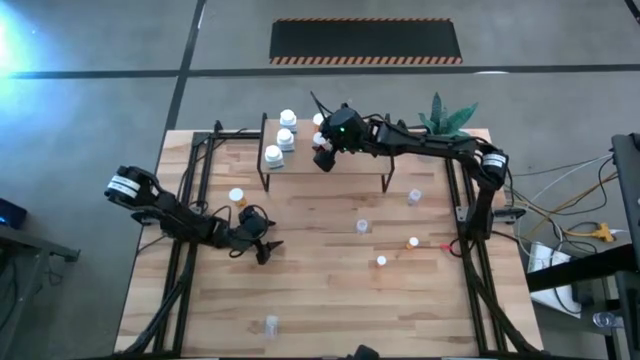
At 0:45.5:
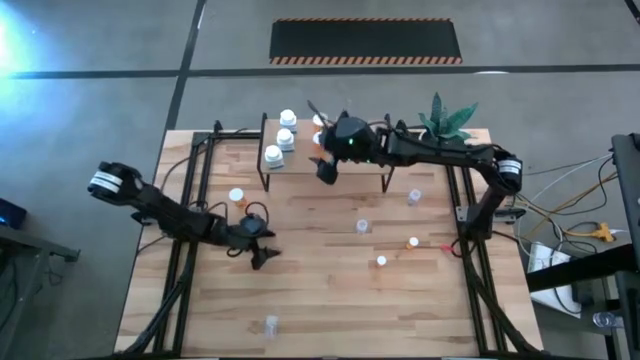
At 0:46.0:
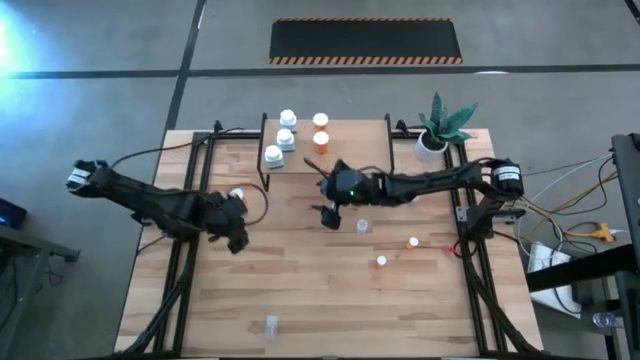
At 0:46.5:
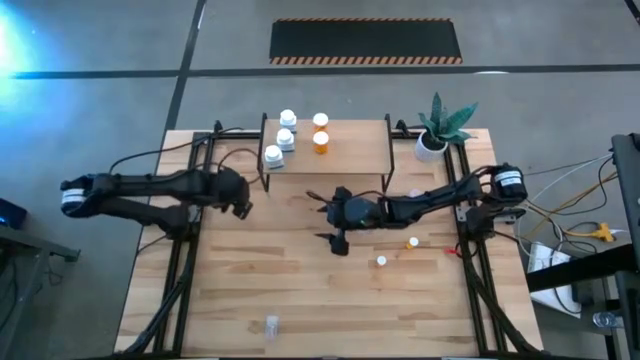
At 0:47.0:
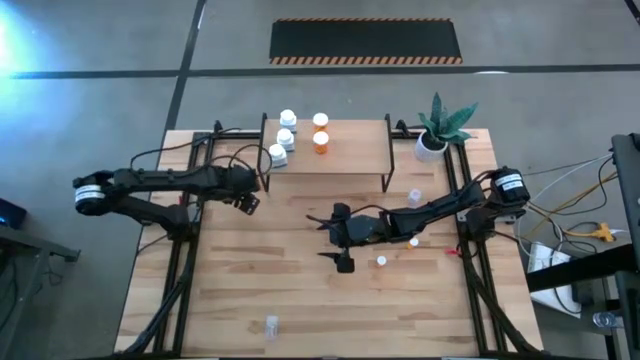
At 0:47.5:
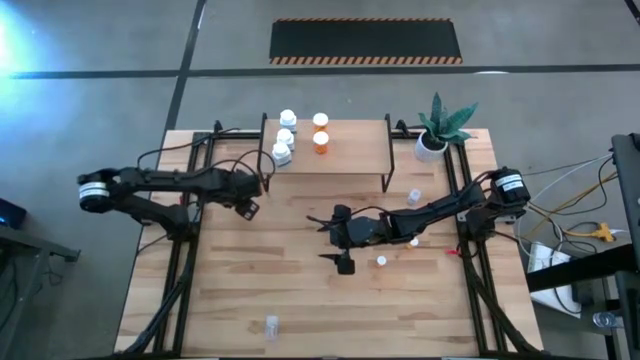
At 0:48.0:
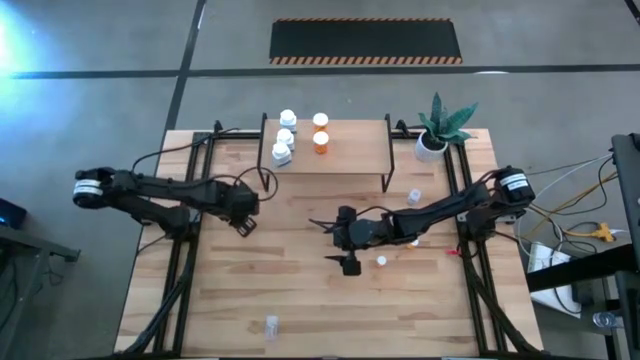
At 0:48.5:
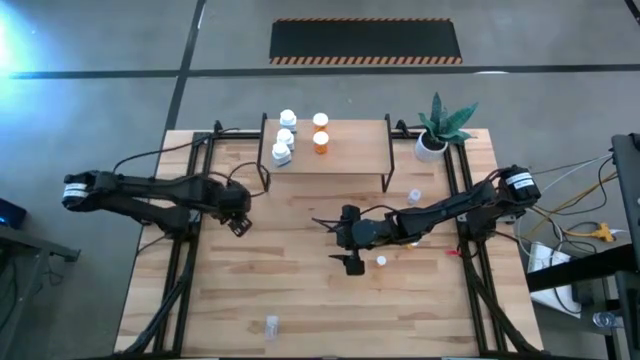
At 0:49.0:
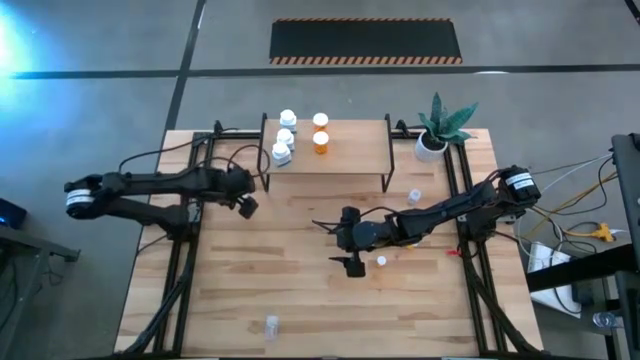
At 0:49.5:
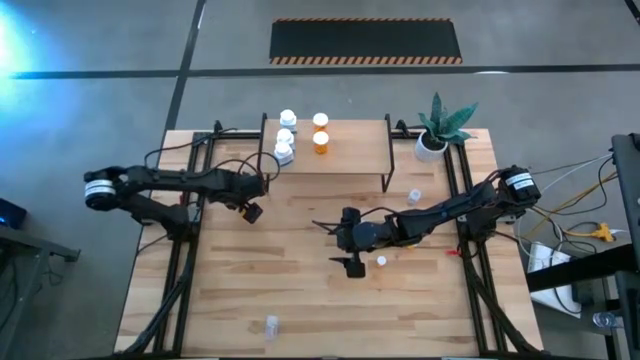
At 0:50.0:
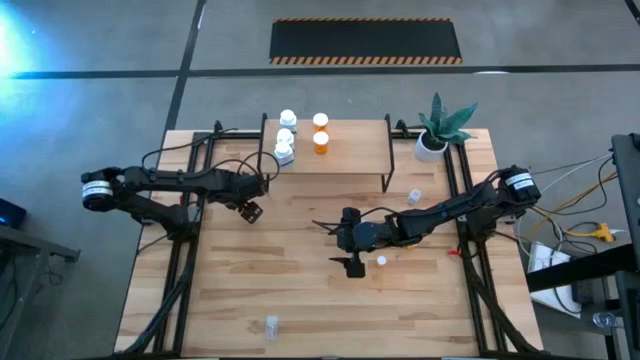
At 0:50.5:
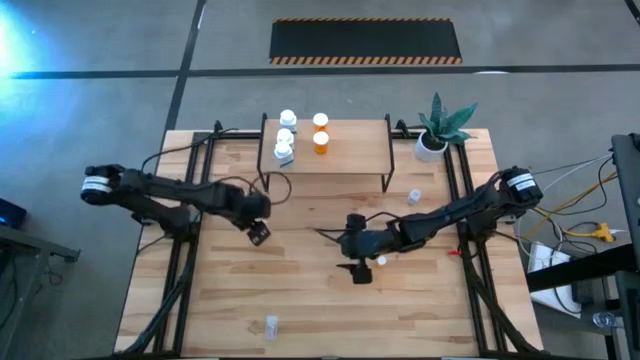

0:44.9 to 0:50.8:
Task: Pick and place medicine bottles onto shelf by color
Put the big orange pill bottle on the shelf aligned with the other big orange pill bottles

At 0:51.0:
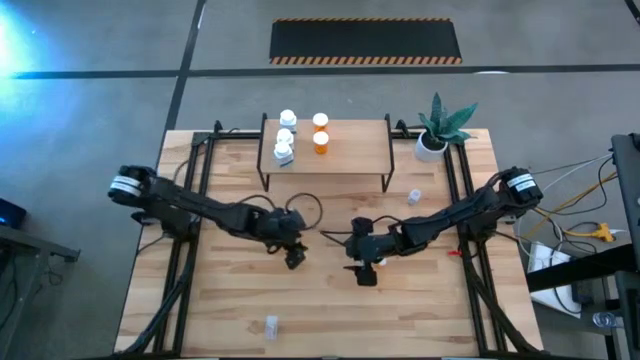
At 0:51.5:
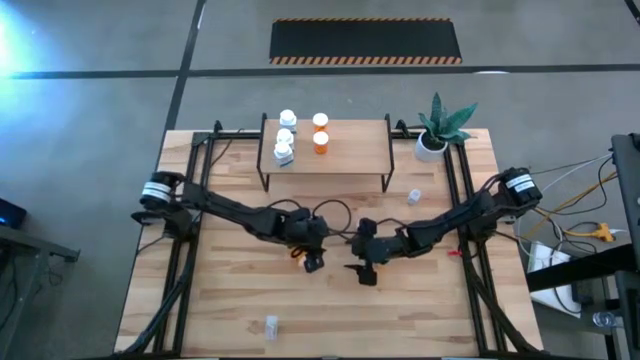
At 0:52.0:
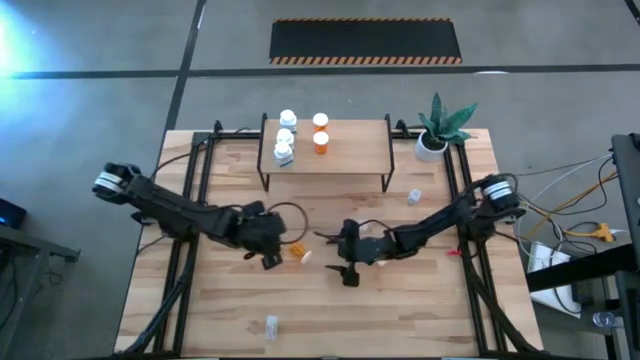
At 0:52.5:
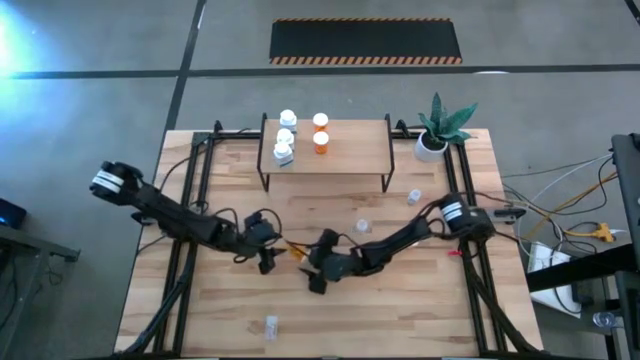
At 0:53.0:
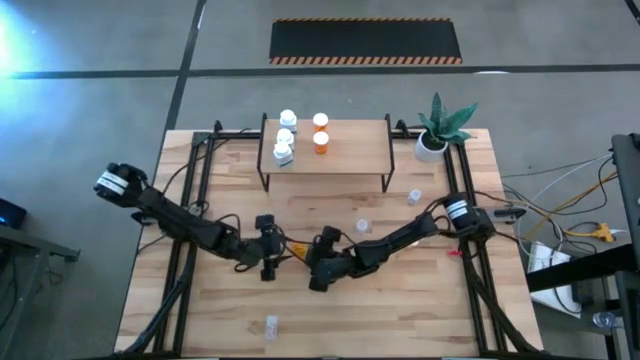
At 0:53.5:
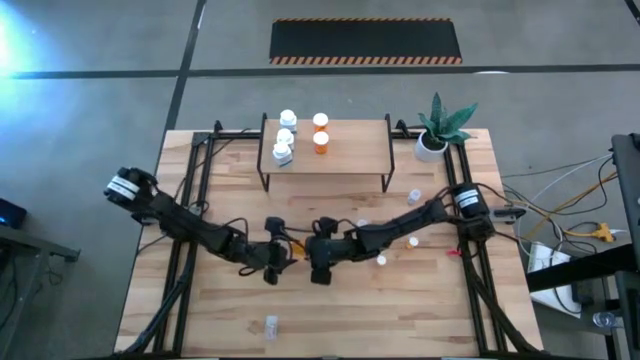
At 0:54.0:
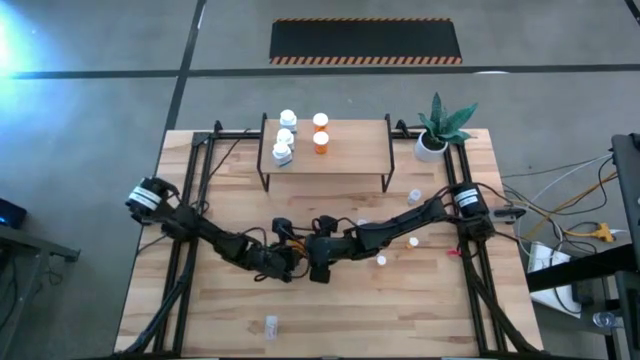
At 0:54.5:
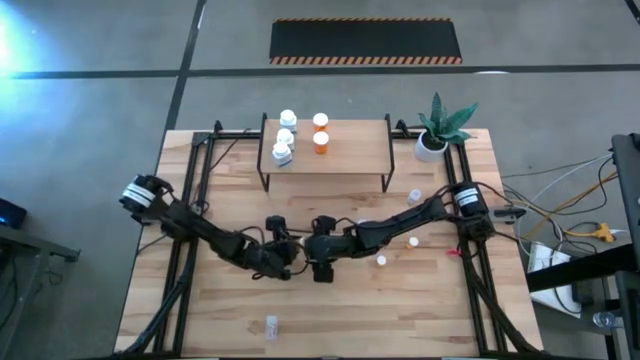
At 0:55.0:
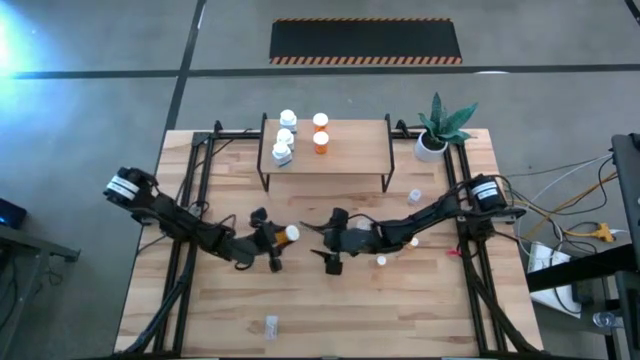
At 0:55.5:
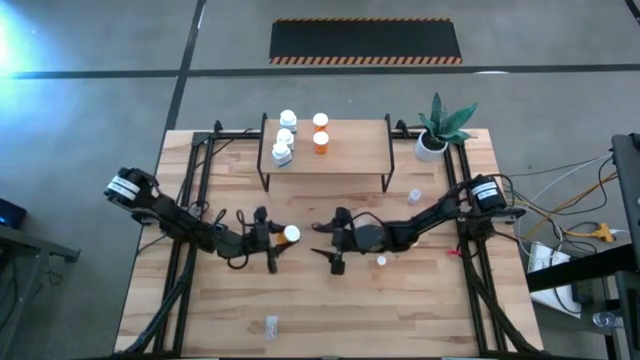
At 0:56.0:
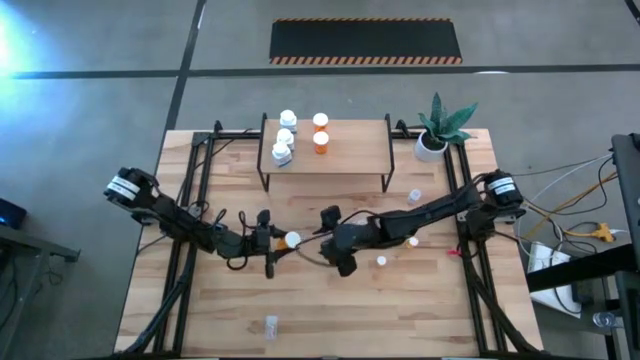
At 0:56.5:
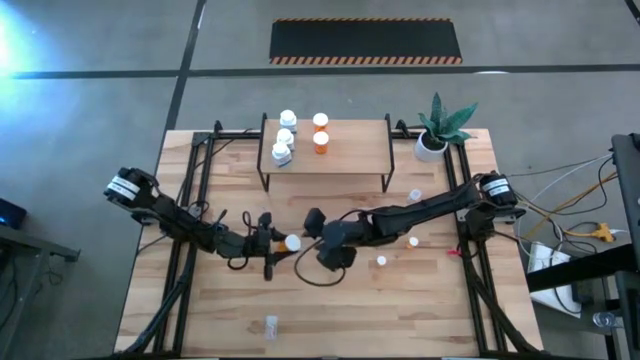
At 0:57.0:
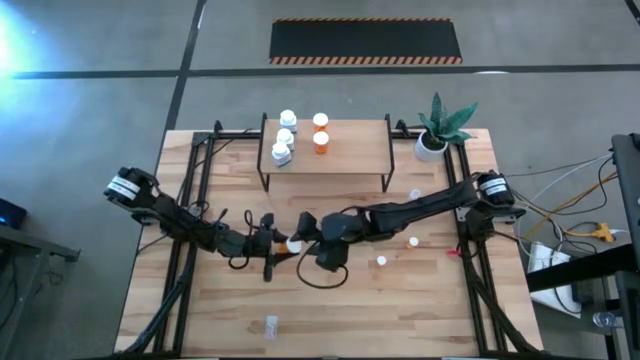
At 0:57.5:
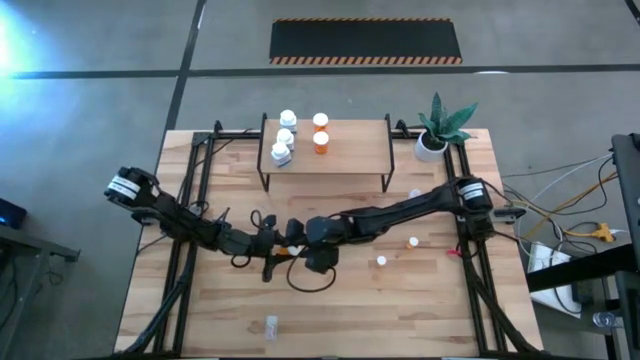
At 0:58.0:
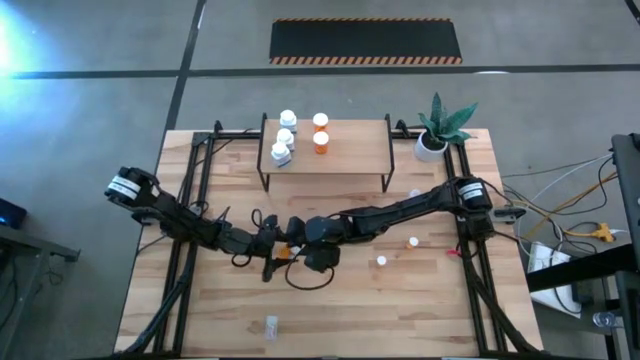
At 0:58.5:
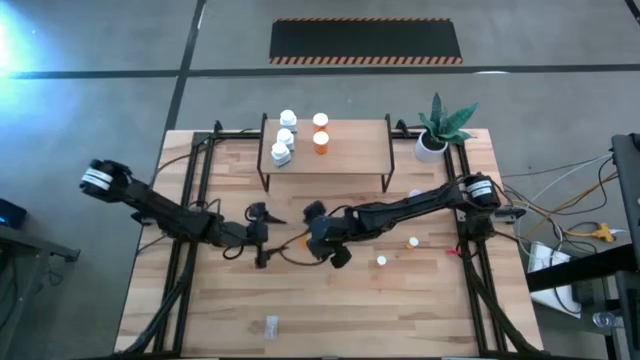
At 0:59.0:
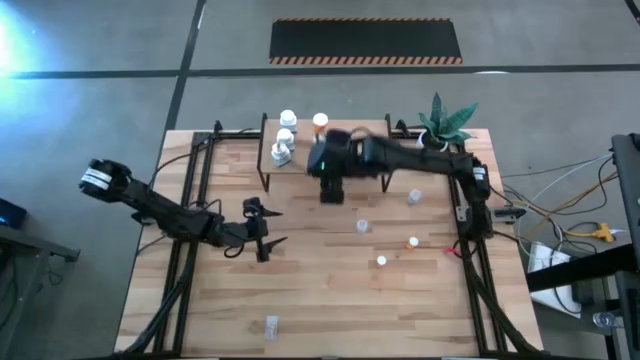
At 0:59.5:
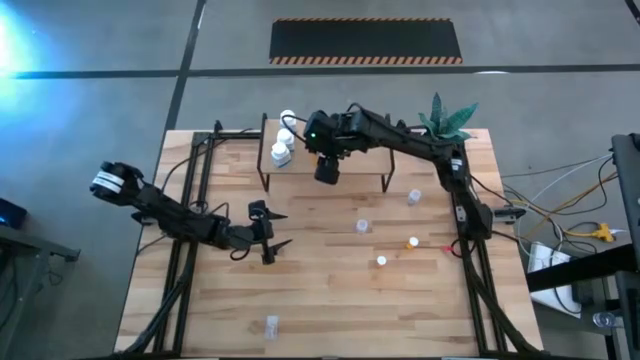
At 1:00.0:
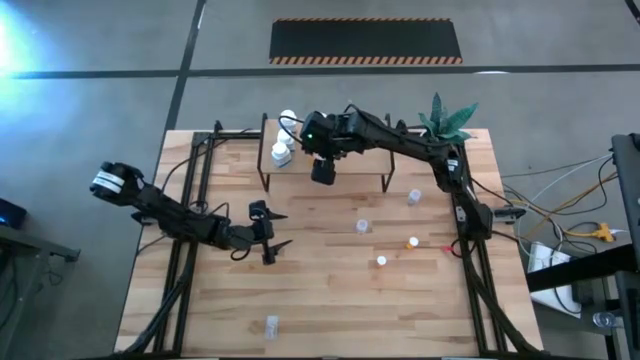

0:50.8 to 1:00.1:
Put the big orange pill bottle on the shelf aligned with the other big orange pill bottles

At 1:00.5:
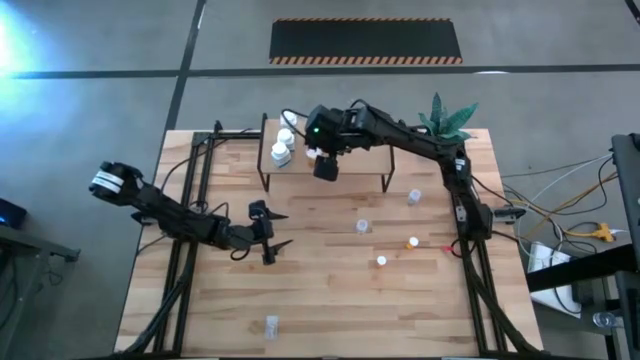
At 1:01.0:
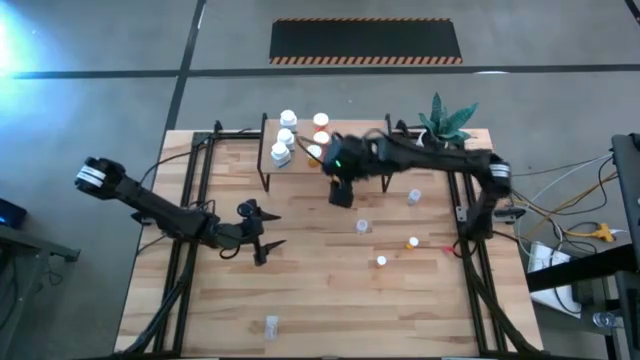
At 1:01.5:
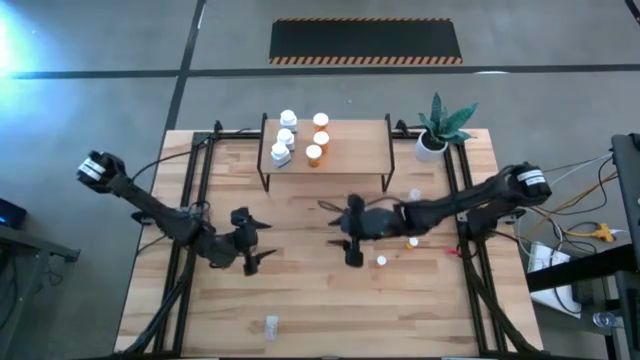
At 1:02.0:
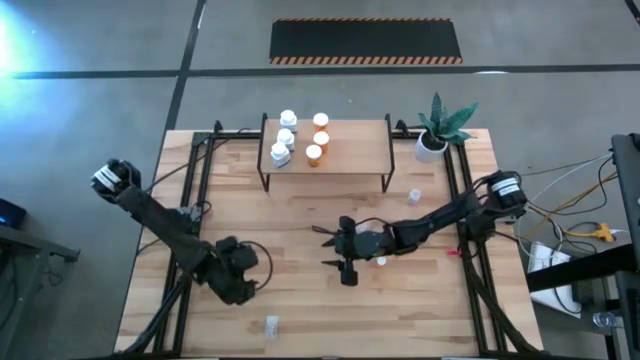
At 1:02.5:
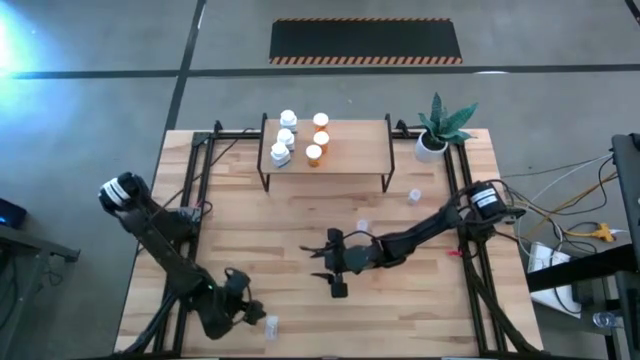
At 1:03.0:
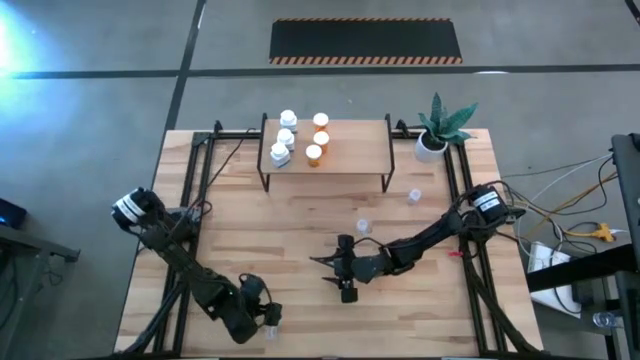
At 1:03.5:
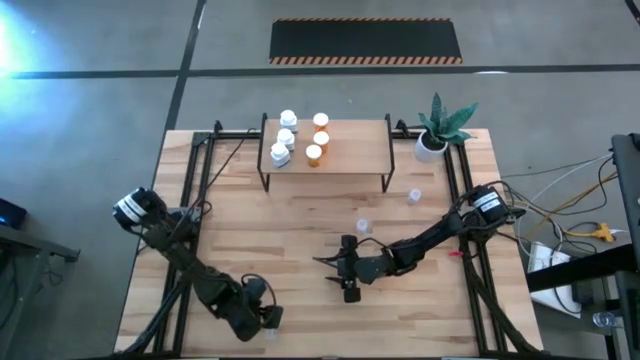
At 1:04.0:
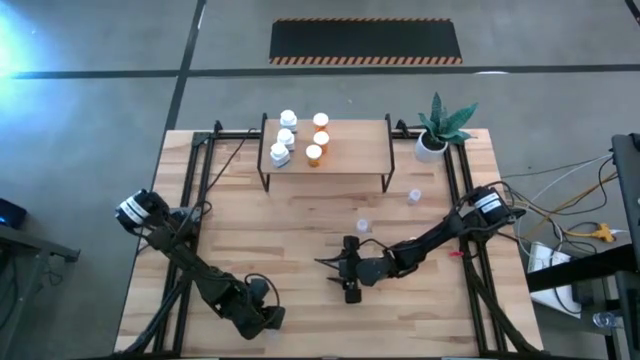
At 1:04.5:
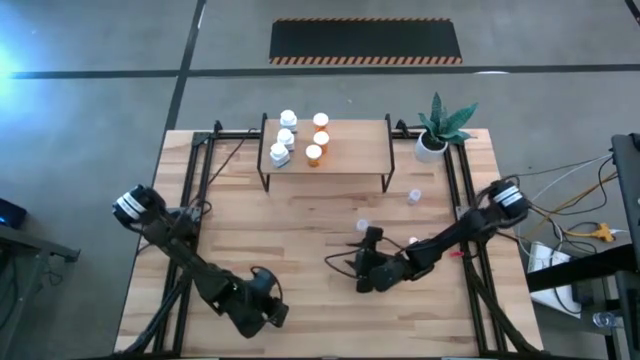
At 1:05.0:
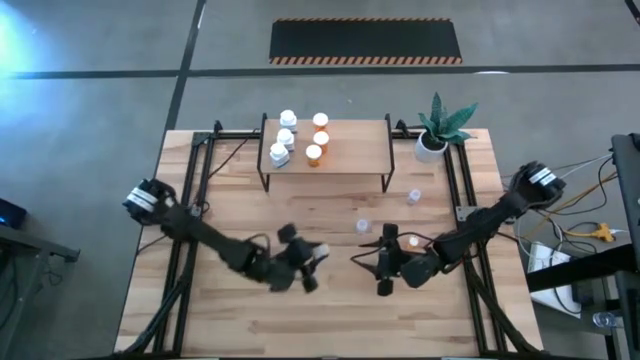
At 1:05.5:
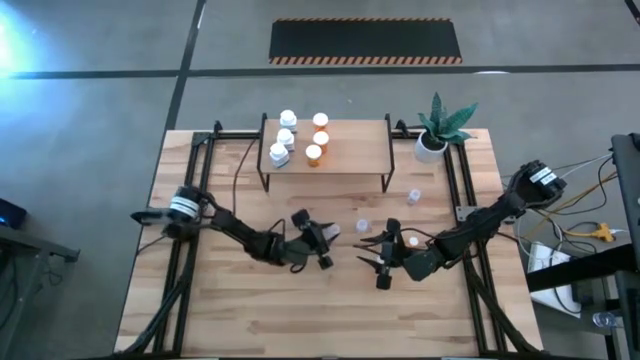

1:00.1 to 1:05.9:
Put the bottom left transparent pill bottle on the shelf

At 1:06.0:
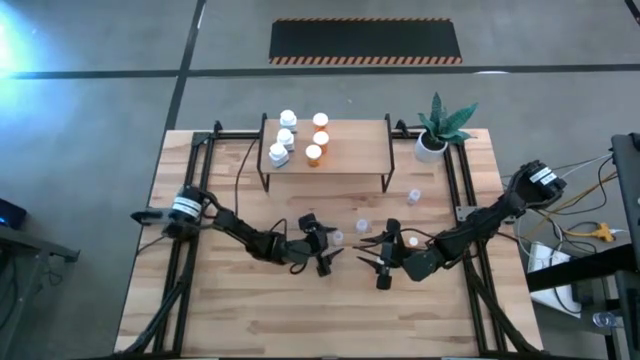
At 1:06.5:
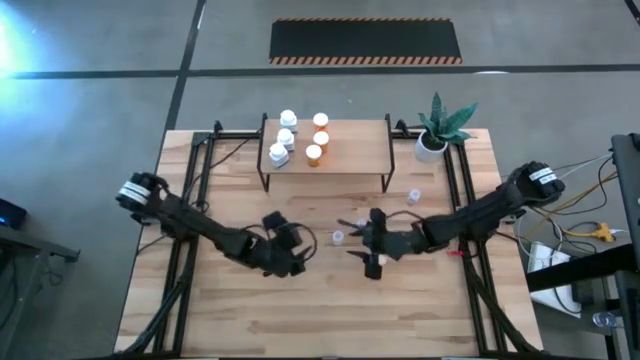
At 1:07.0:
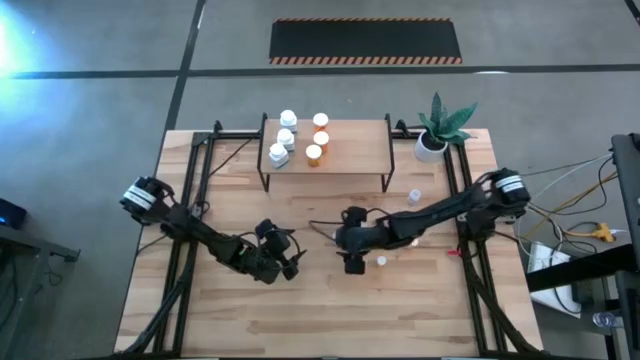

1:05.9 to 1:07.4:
Put the bottom left transparent pill bottle on the shelf
